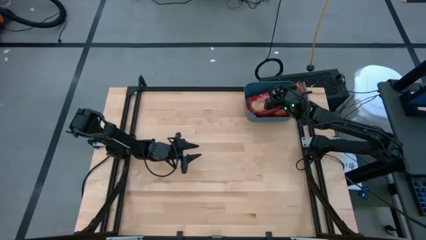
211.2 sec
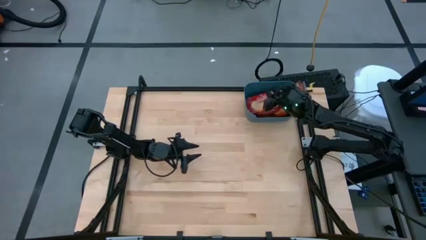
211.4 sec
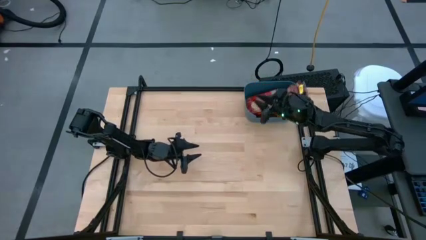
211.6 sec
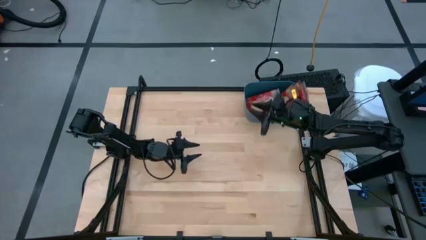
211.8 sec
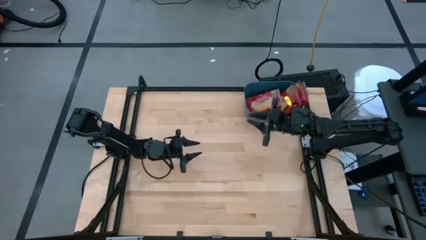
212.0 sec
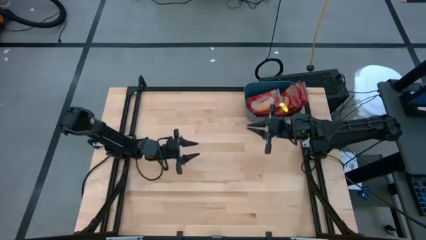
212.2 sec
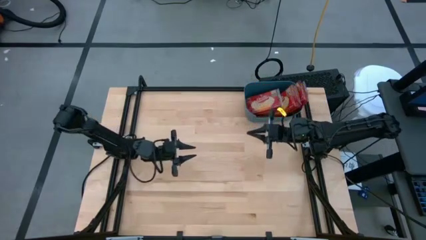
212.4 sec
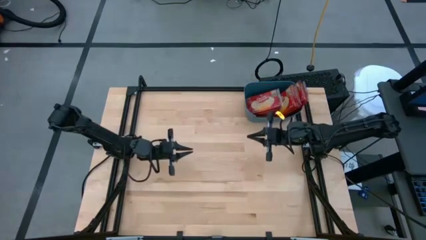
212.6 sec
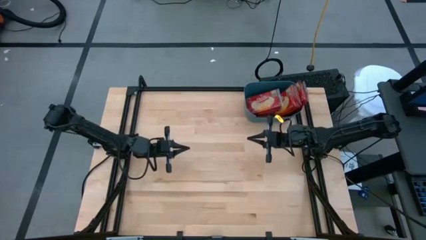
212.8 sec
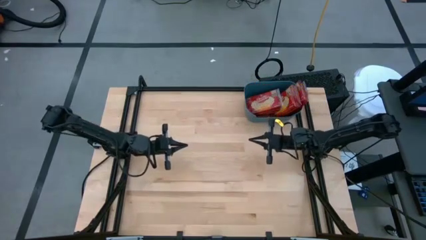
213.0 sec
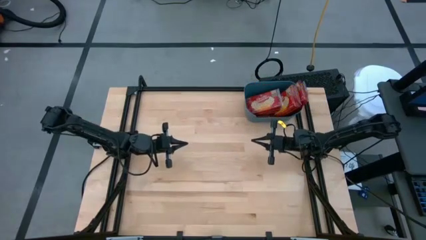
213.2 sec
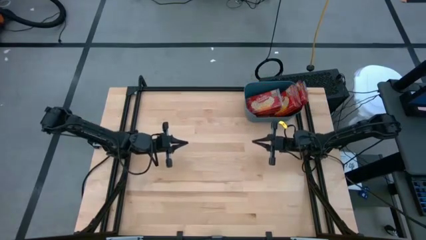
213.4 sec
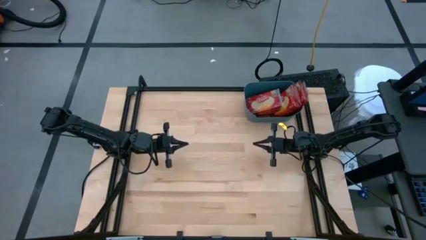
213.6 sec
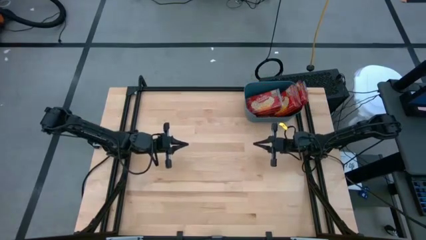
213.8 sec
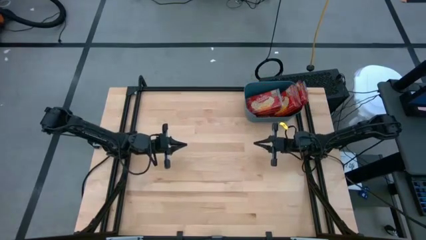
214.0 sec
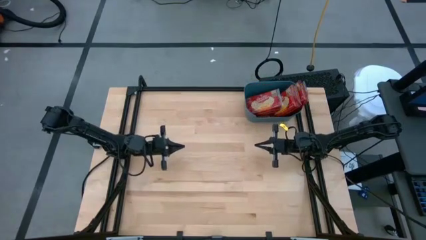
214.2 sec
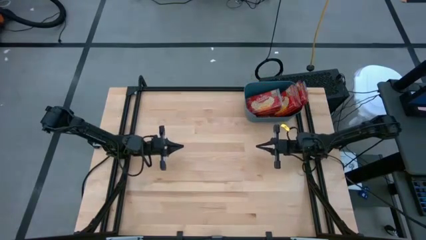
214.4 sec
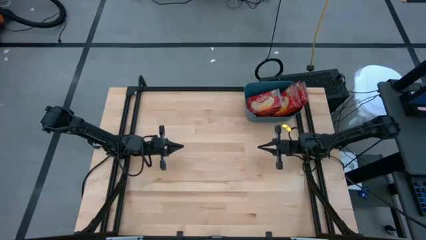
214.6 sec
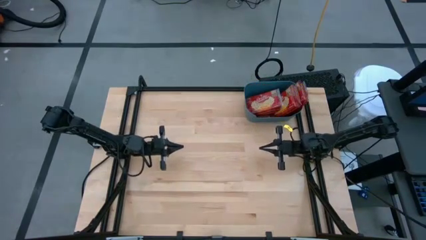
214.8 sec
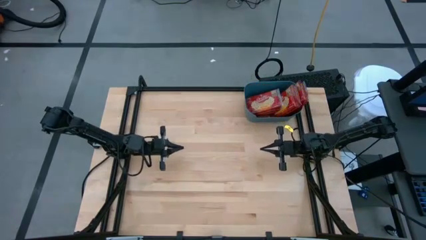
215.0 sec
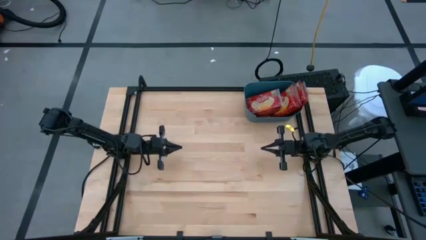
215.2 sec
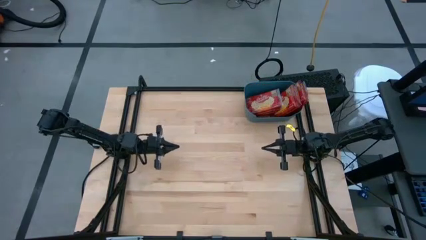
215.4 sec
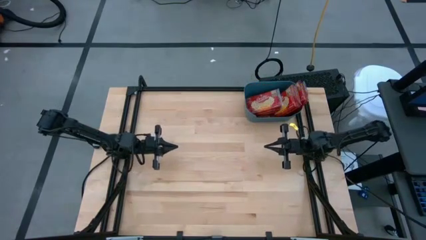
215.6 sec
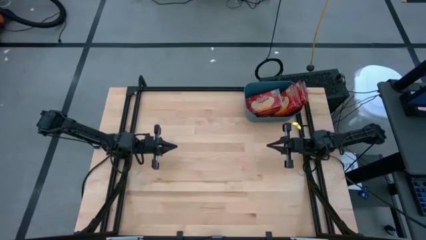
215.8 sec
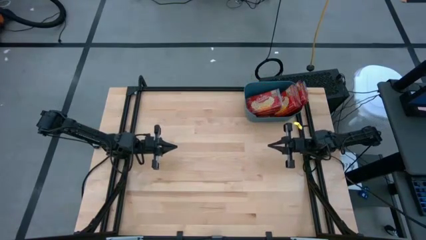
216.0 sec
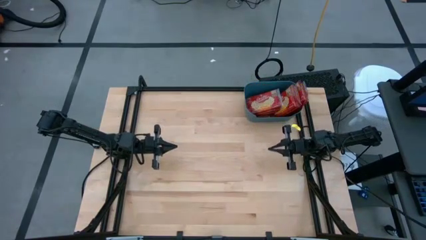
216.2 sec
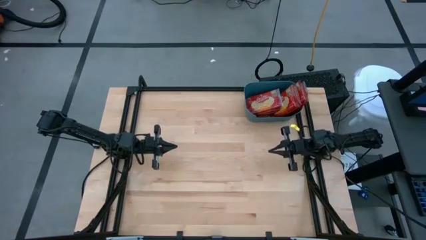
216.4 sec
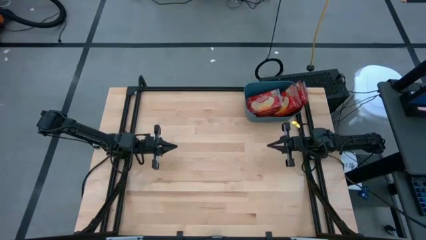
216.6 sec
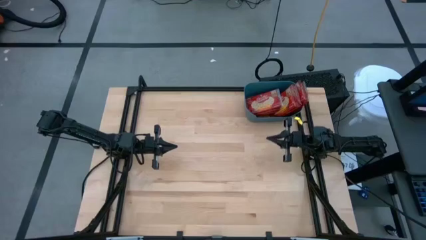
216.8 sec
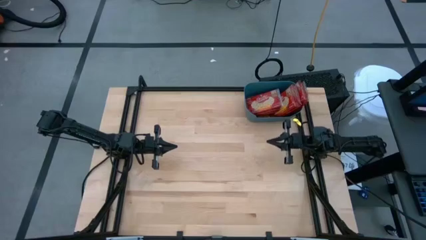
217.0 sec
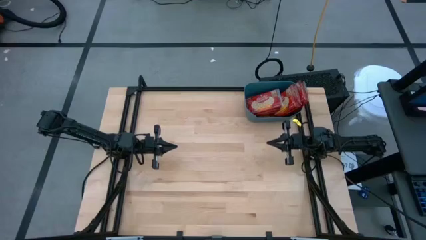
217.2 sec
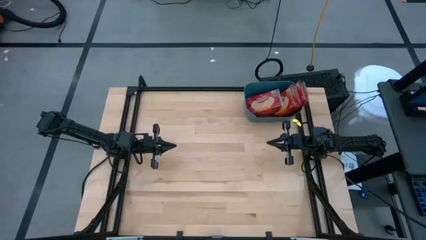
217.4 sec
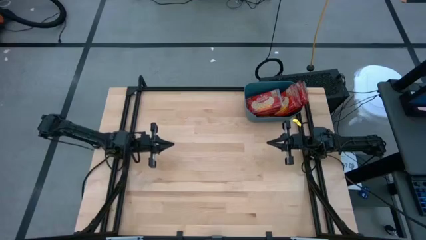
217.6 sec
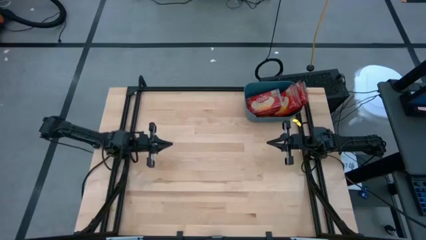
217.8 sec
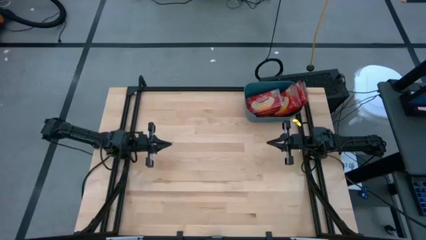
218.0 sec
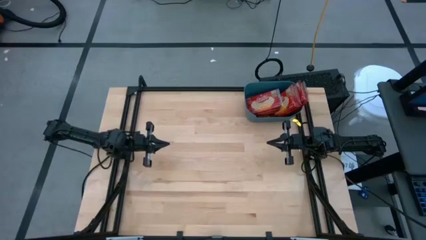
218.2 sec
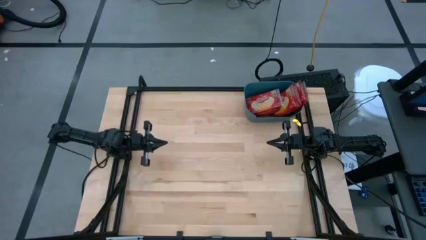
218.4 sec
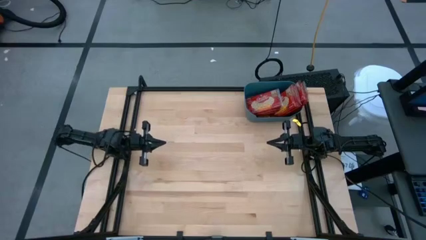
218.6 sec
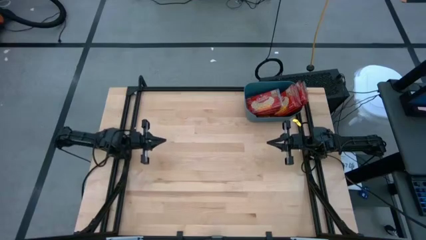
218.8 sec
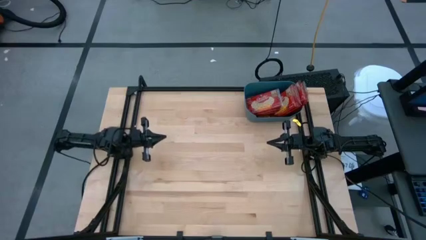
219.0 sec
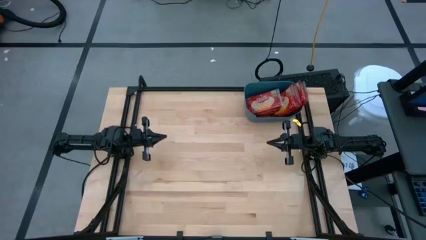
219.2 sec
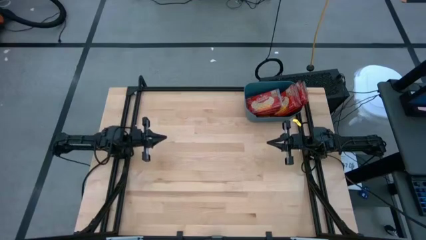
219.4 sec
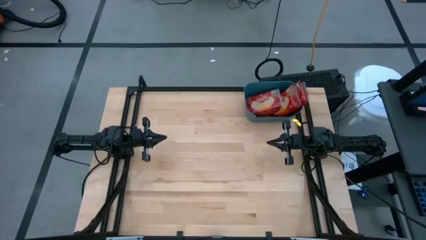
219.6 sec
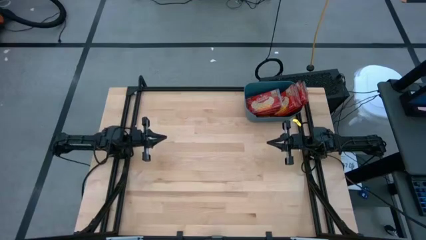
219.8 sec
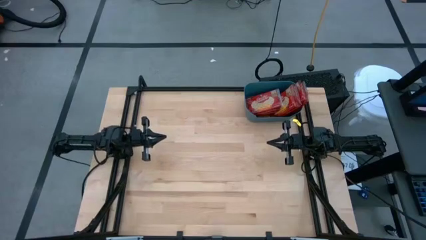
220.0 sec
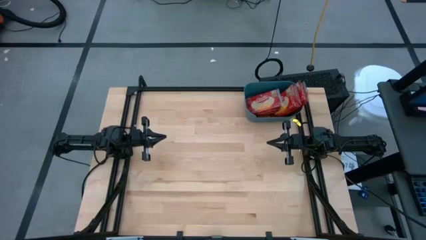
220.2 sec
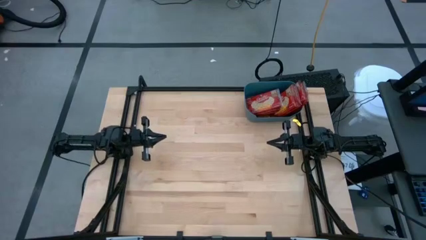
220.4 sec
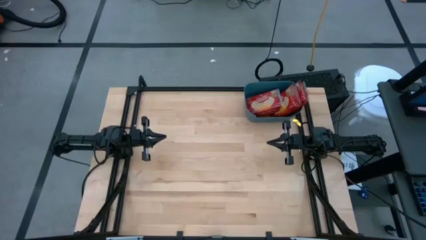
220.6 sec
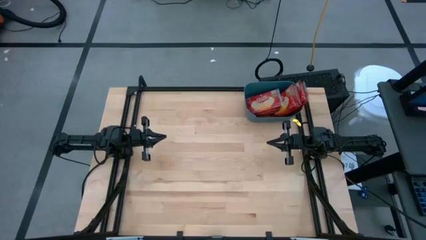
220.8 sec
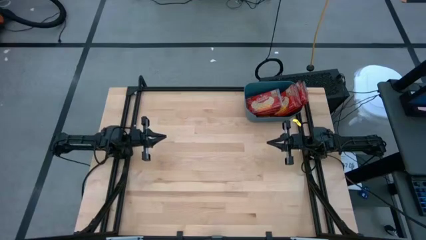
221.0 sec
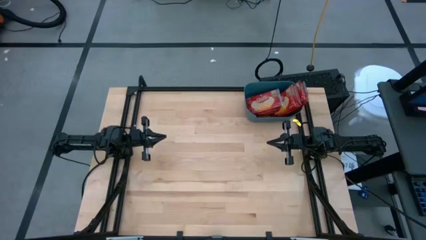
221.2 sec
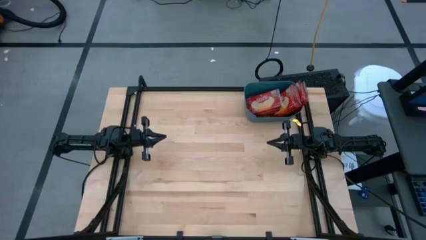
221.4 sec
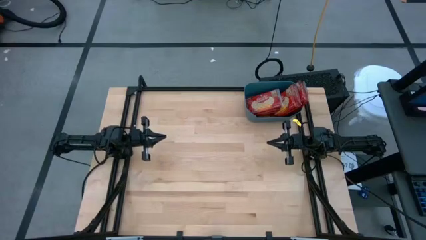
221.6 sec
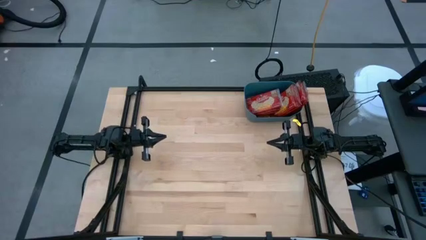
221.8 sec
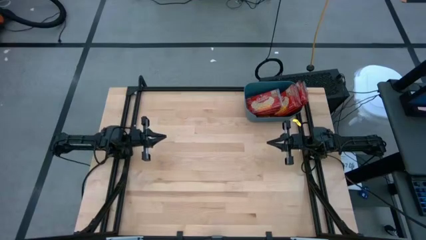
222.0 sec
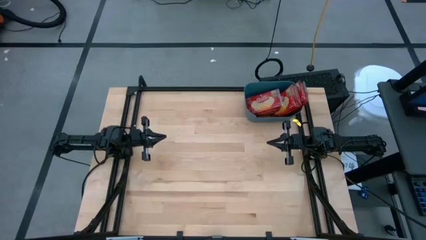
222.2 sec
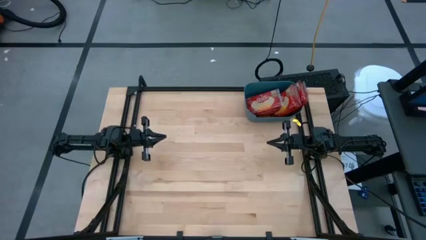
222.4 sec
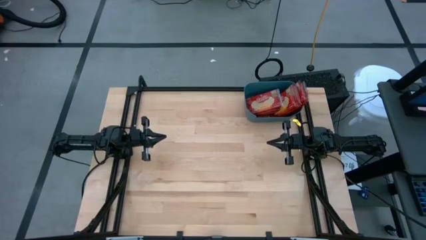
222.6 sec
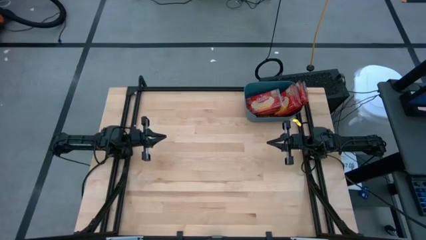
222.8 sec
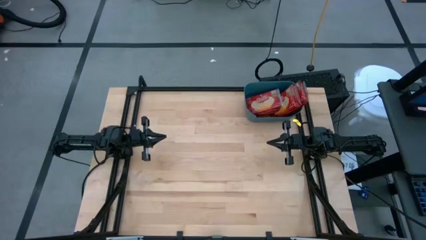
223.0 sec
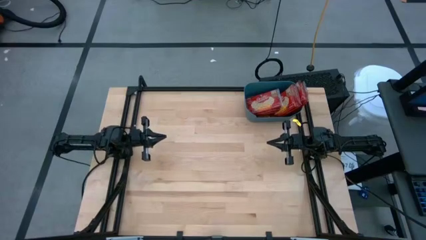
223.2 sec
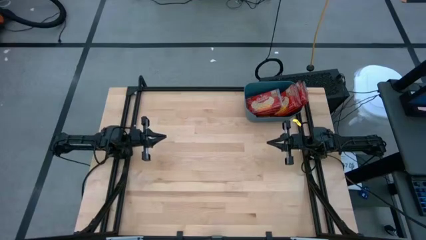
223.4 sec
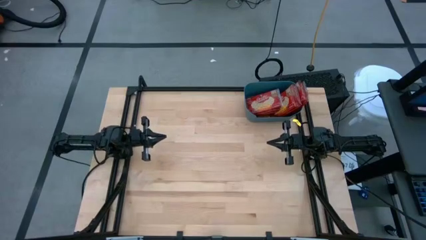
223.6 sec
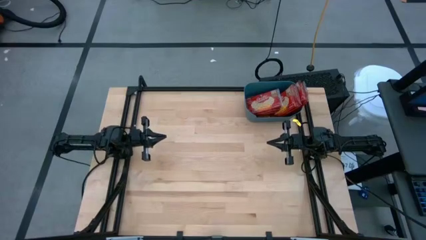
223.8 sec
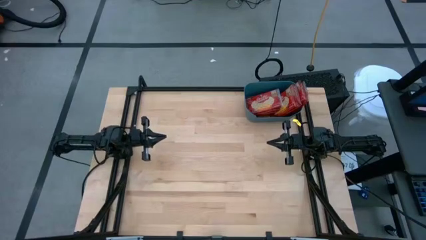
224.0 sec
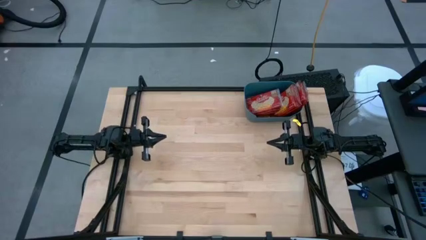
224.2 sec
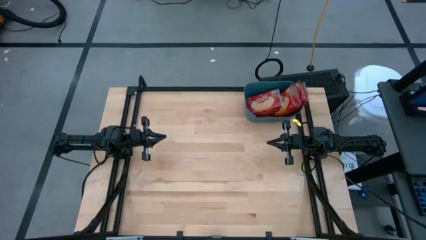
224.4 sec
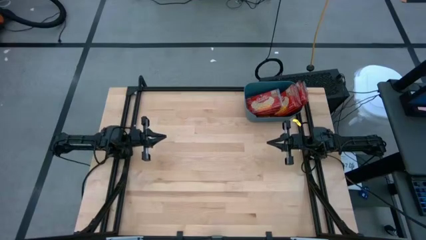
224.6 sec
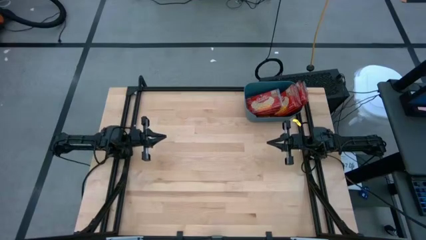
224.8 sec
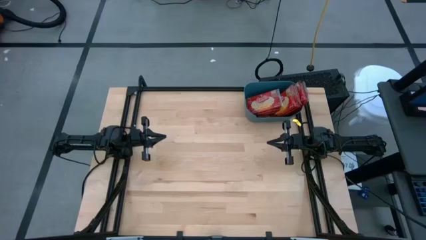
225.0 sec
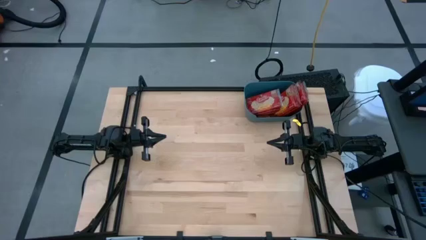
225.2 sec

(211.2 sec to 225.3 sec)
Task: Sort popcorn bags into baskets
Return to Home Position

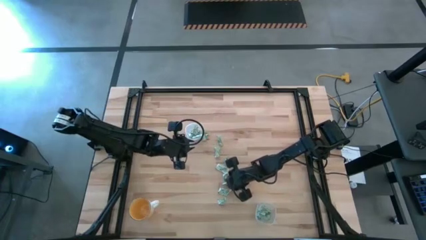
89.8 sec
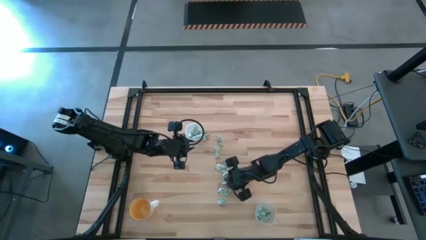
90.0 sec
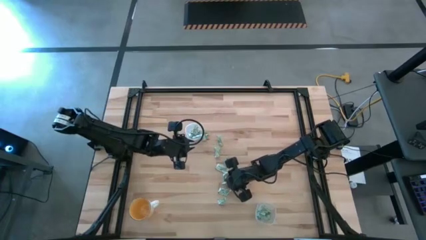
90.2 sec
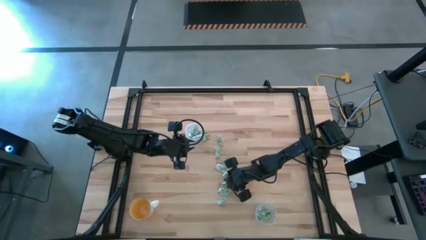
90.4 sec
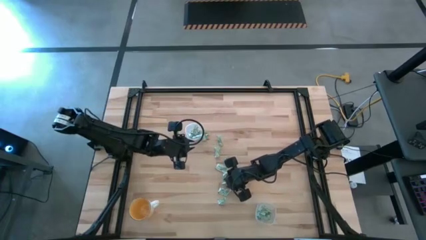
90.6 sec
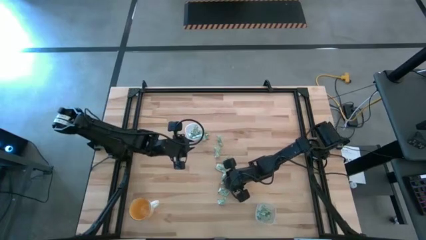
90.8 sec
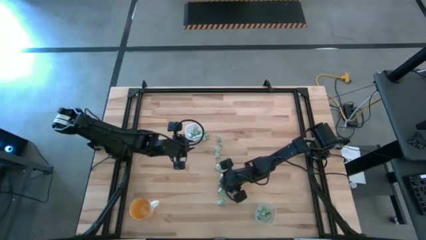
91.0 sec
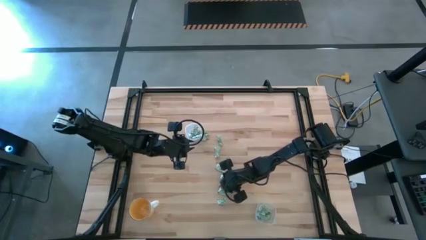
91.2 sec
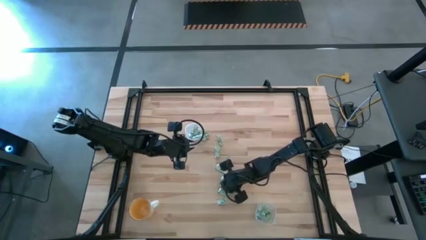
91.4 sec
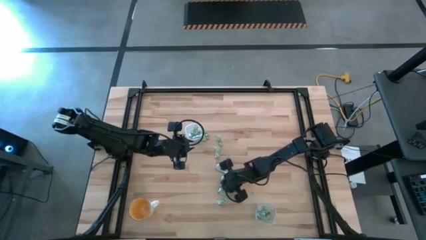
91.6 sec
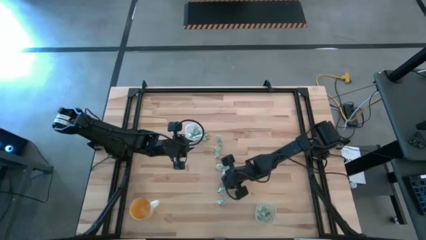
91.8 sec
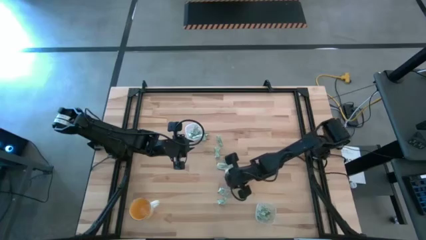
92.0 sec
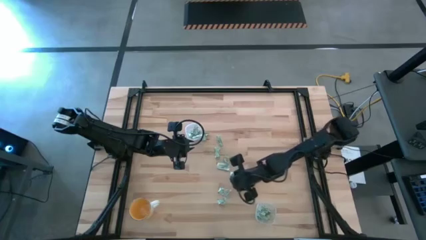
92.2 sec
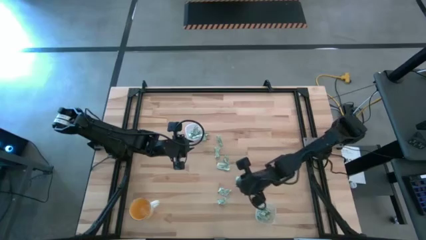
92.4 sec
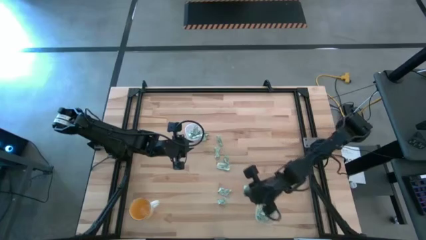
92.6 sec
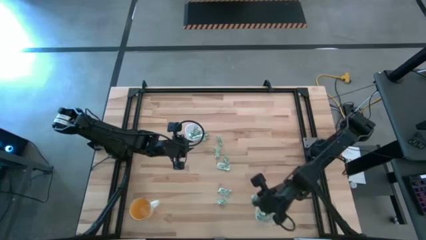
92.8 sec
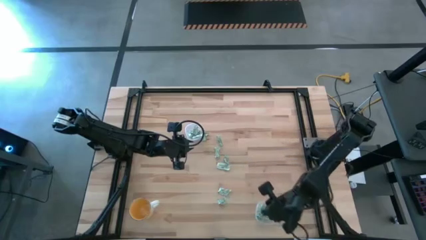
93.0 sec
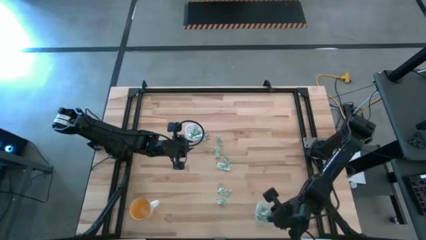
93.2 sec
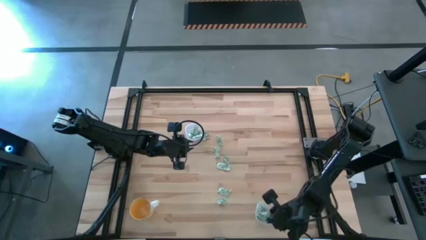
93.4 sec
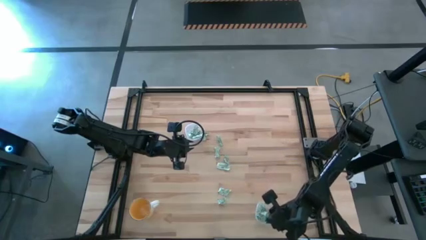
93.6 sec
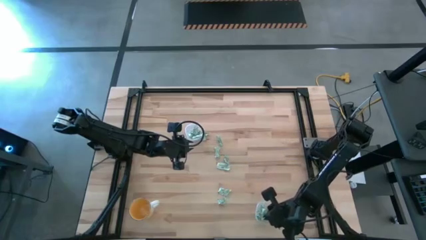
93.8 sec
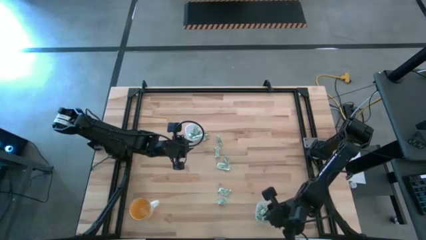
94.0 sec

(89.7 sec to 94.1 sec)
Task: Pick and place Stevia / Truvia into bins
Put the stevia packet into the bottom transparent container
